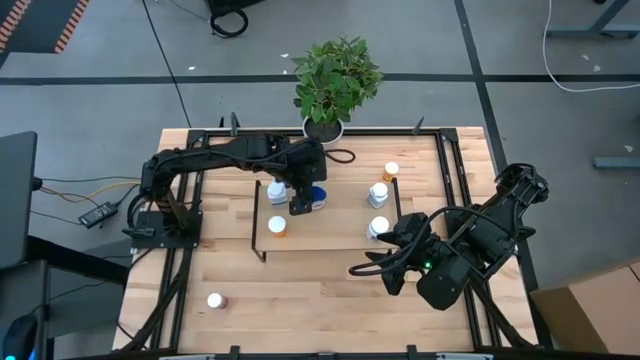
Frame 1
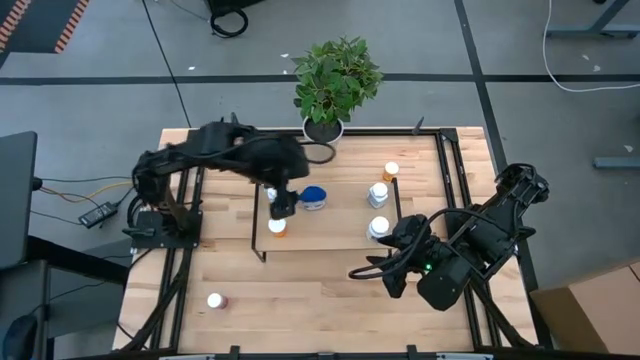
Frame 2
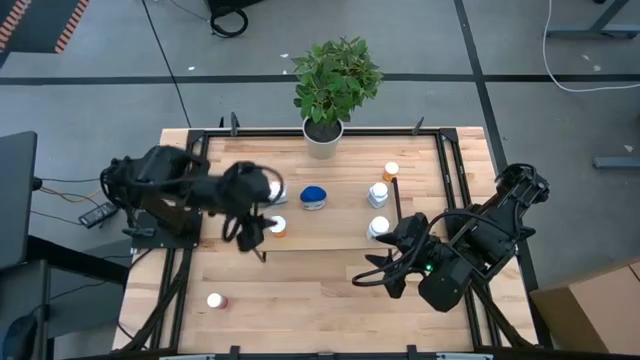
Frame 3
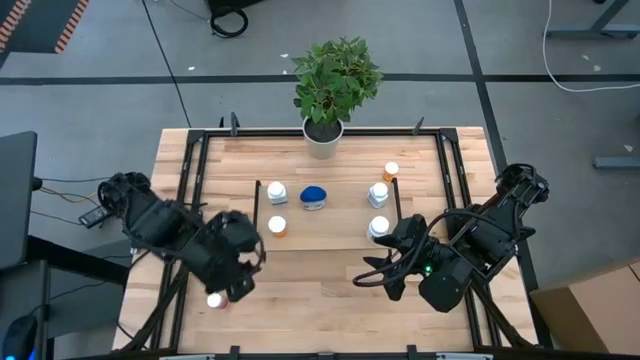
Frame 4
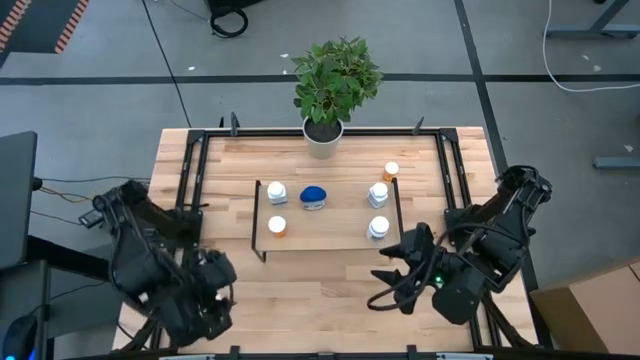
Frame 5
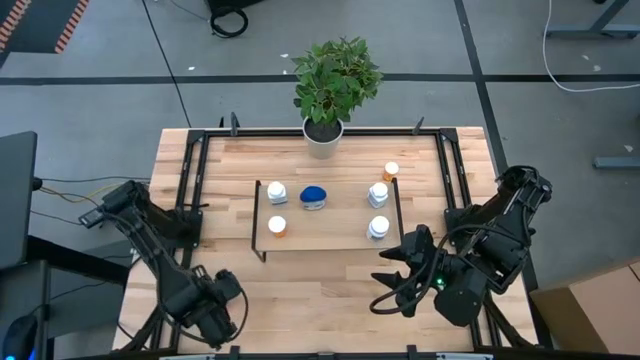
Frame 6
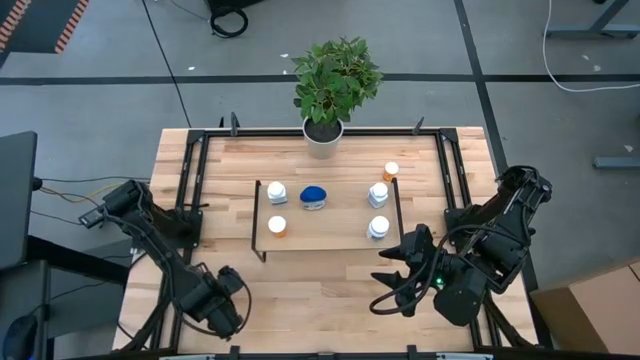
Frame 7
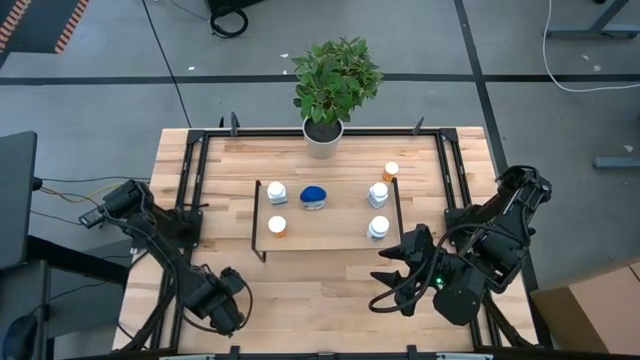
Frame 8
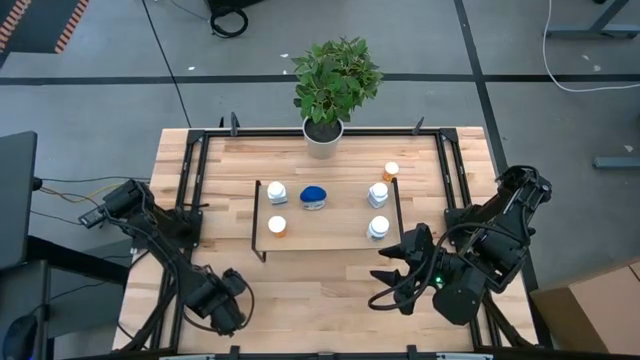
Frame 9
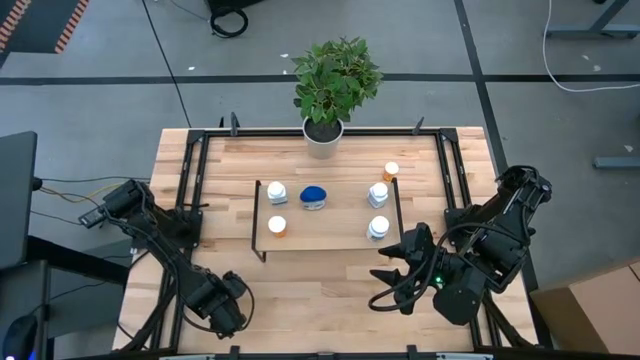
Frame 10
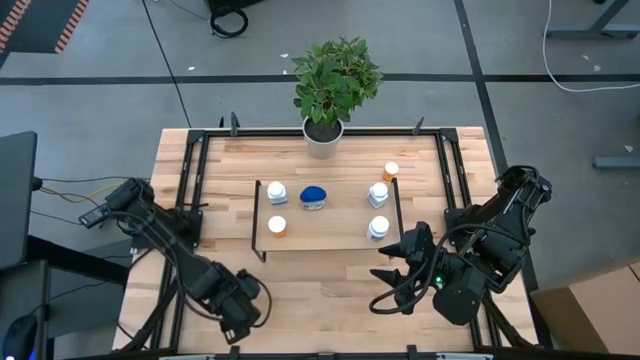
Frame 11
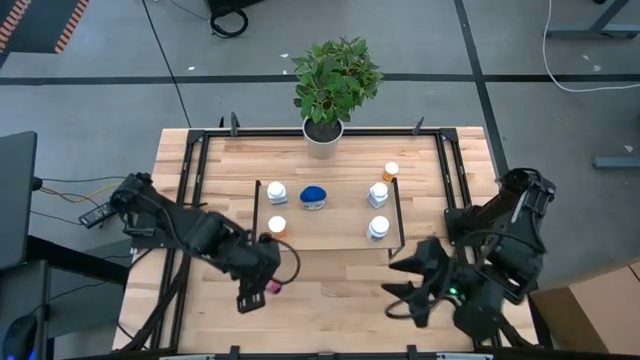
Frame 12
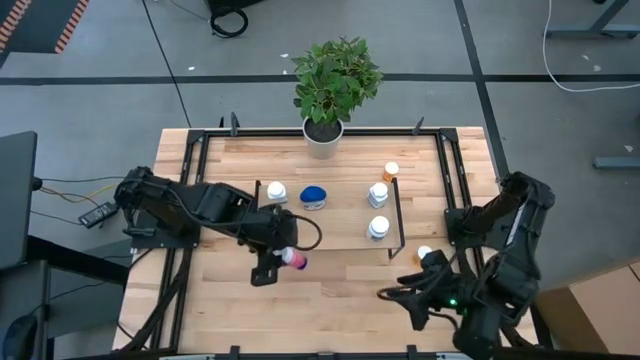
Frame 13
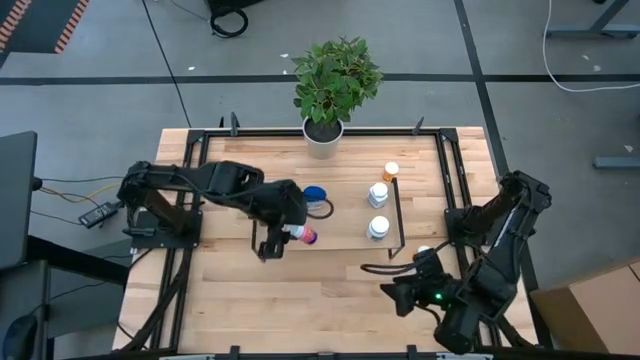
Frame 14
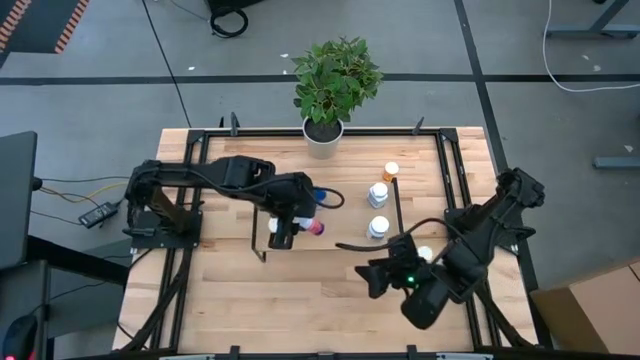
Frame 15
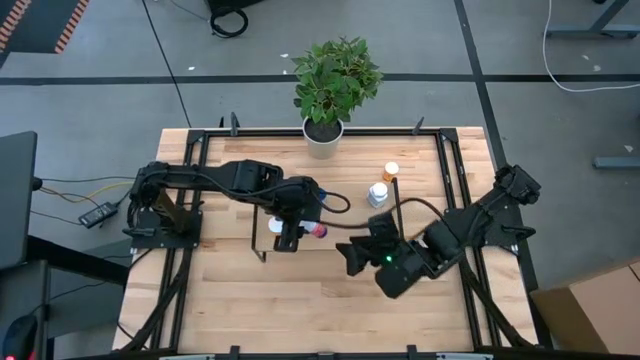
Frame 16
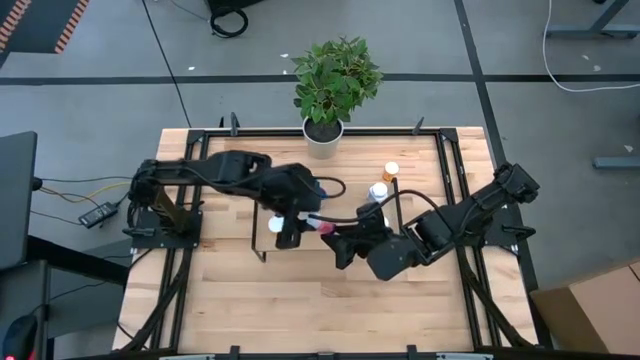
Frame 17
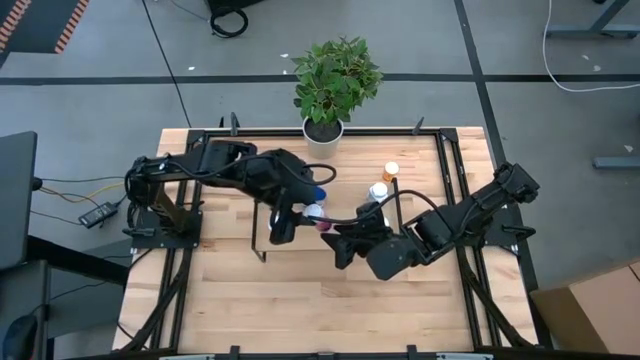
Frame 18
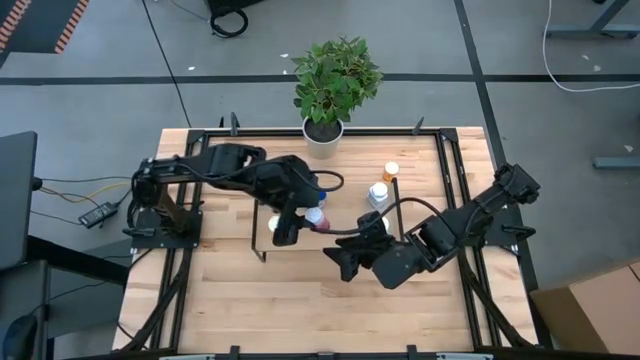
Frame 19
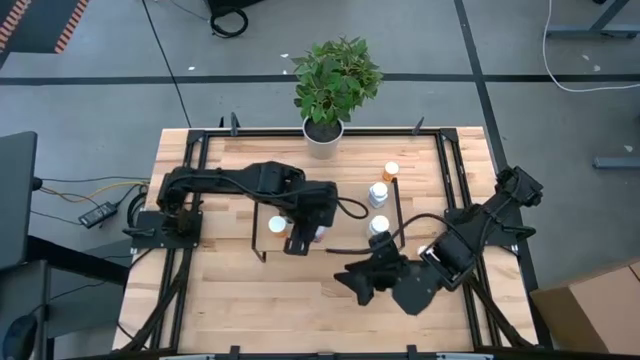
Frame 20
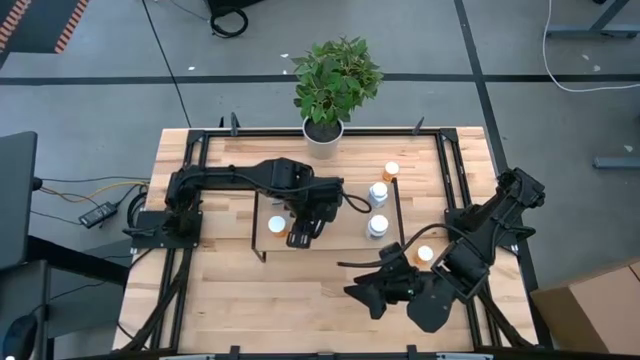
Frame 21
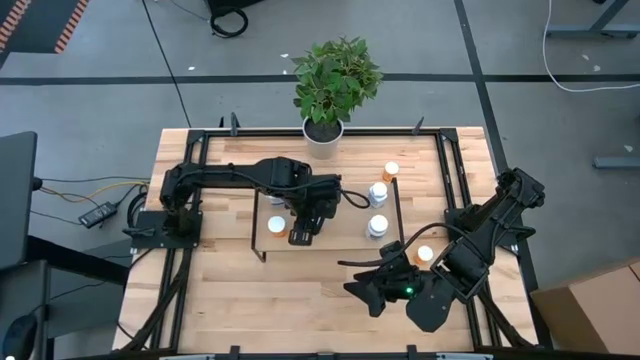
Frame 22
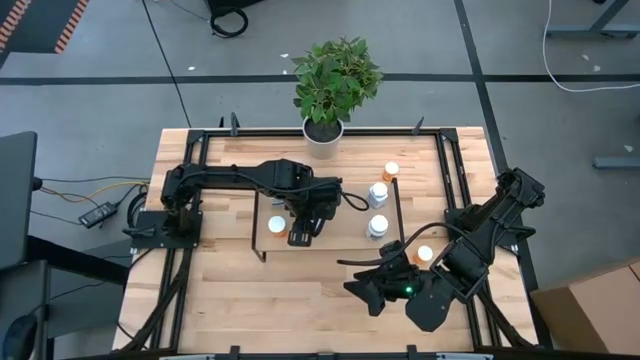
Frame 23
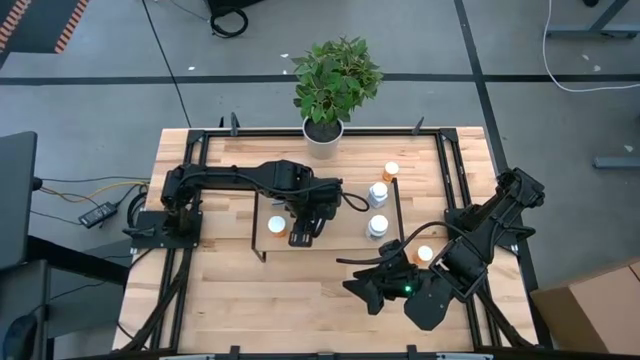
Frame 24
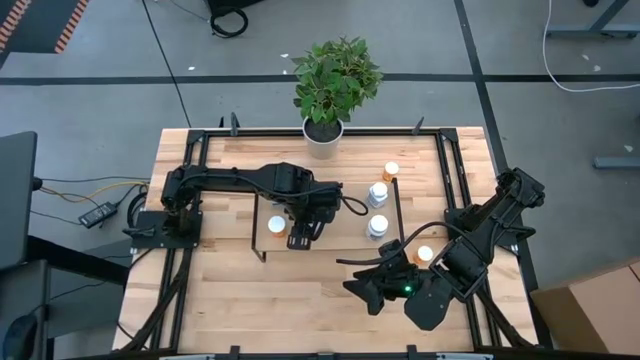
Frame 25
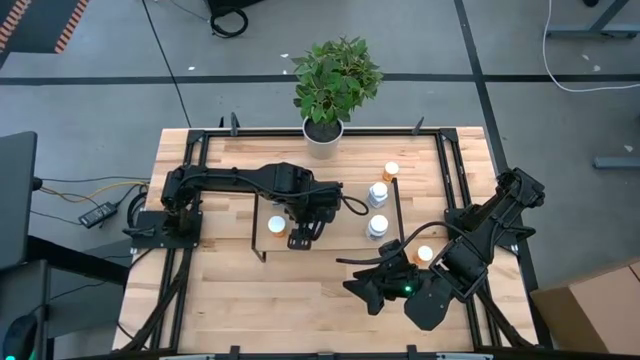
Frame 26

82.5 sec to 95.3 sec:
Task: Pick and place medicine bottles onto shelf by color
Put the pink pill bottle on the shelf

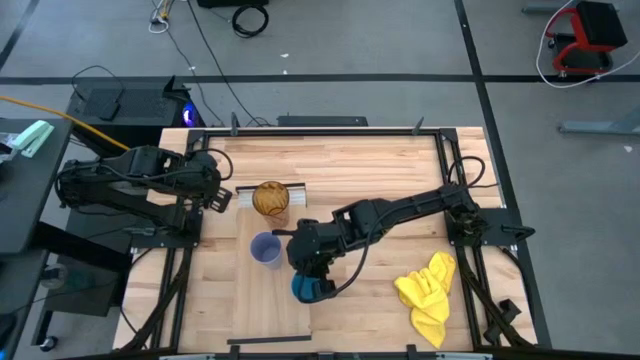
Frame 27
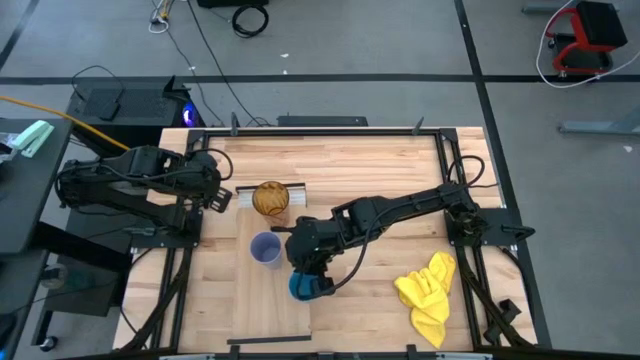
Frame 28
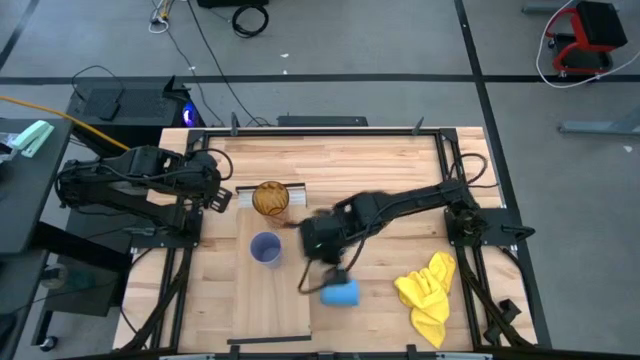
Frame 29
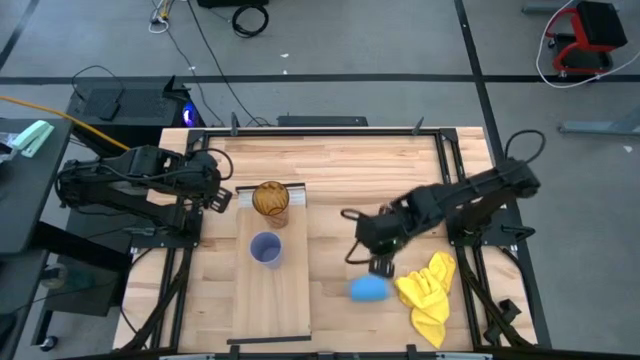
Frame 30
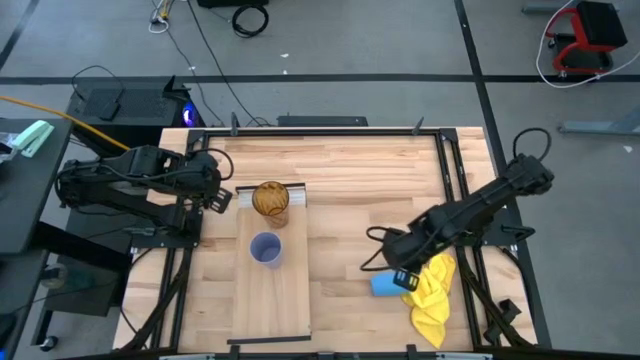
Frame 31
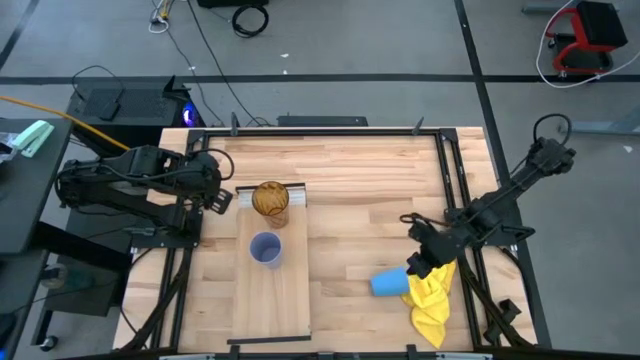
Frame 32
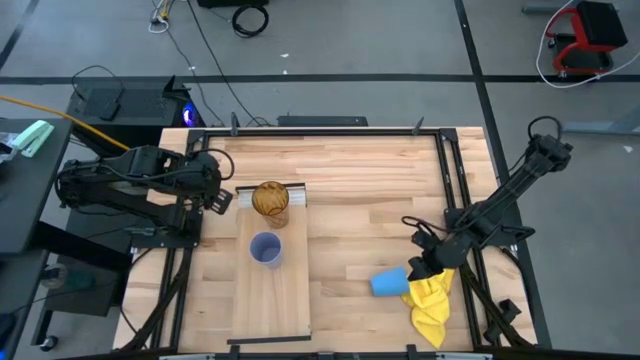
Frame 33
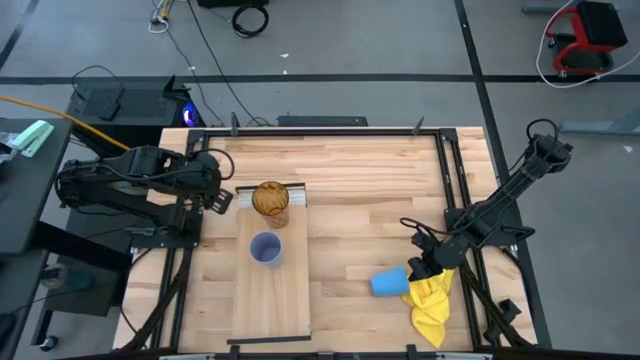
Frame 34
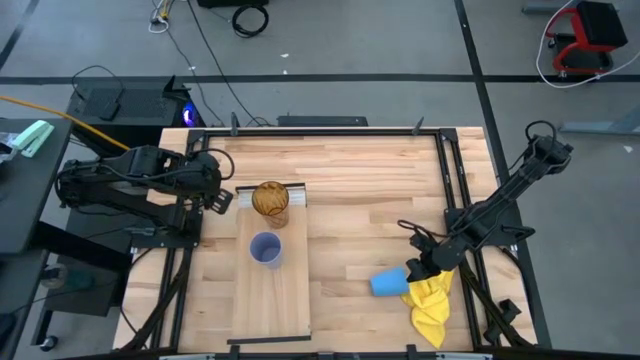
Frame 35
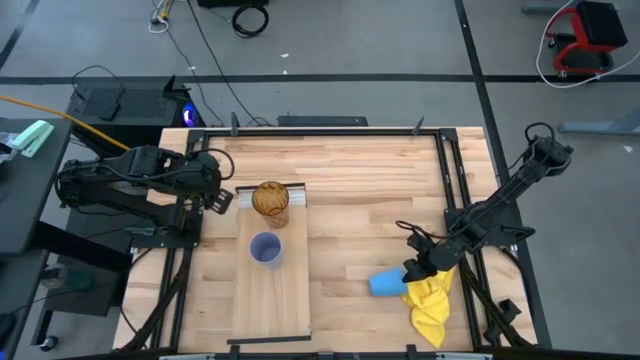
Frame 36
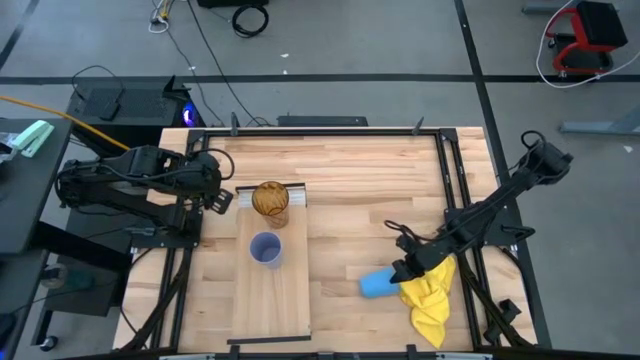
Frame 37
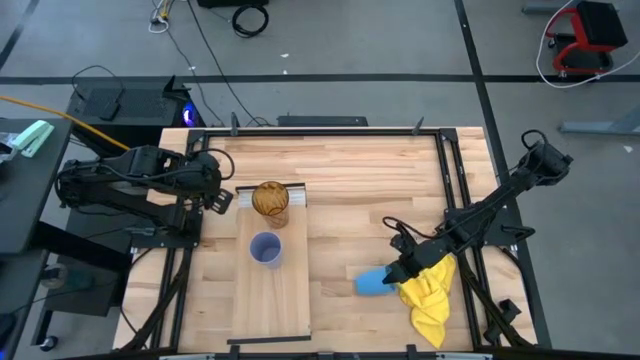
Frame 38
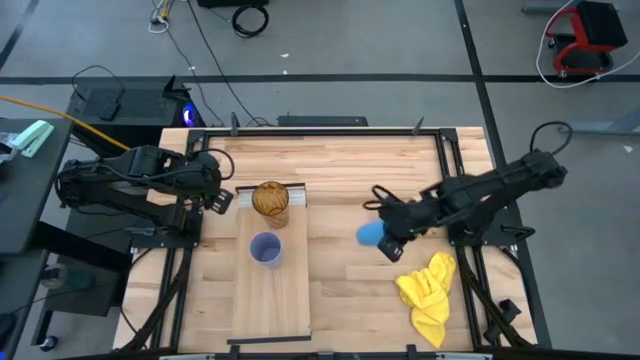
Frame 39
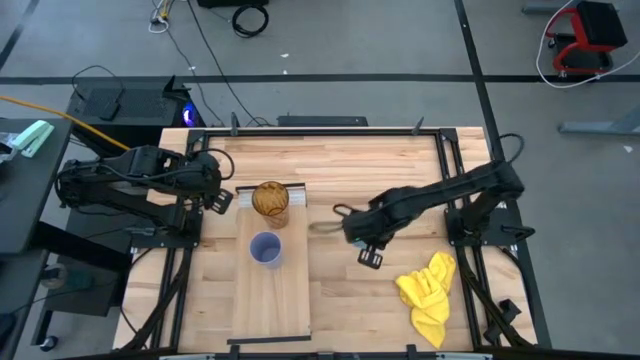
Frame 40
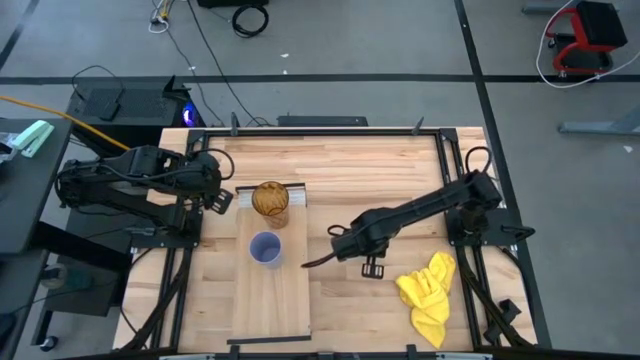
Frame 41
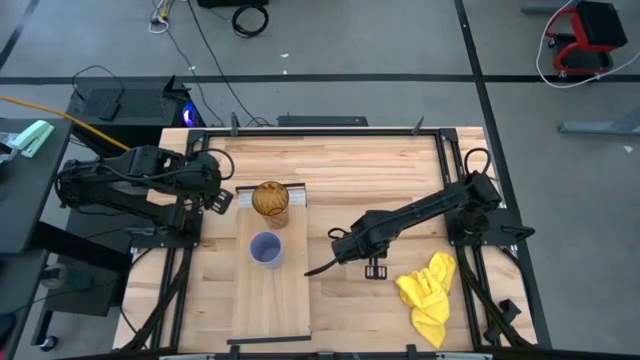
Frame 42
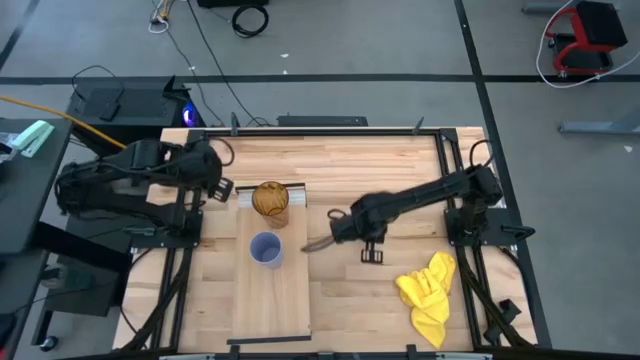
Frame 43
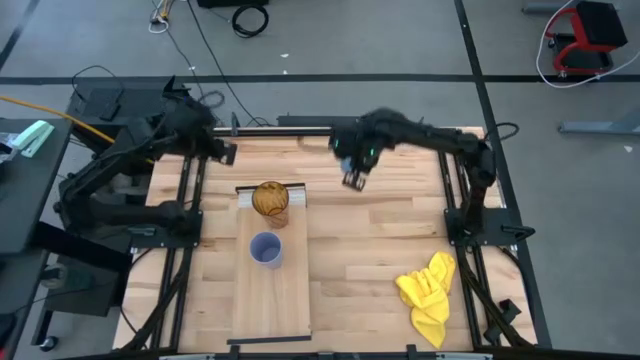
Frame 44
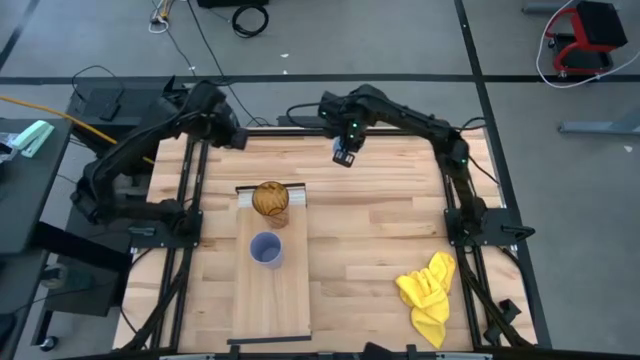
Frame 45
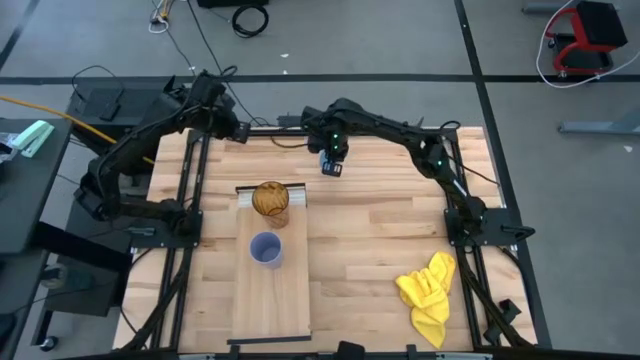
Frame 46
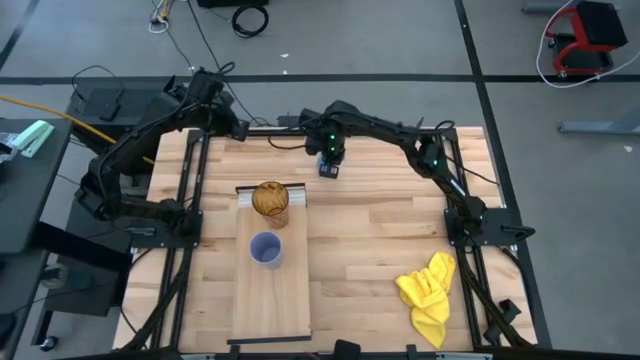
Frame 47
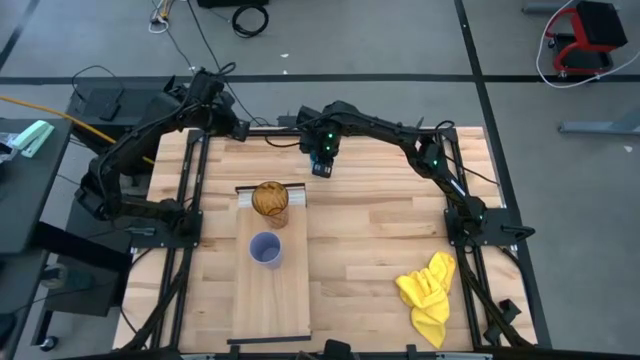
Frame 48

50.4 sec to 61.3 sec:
Task: Stack small to large cups/mugs on shelf
Move the light blue cup
